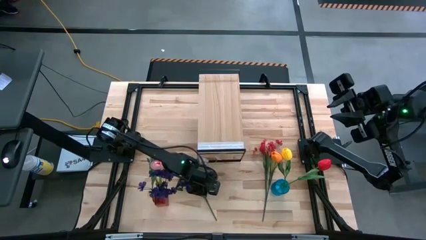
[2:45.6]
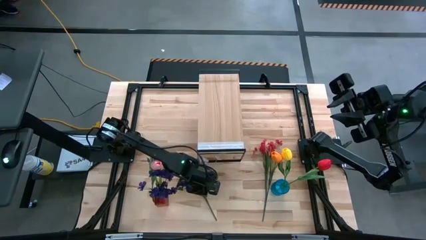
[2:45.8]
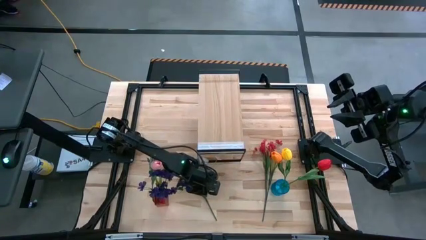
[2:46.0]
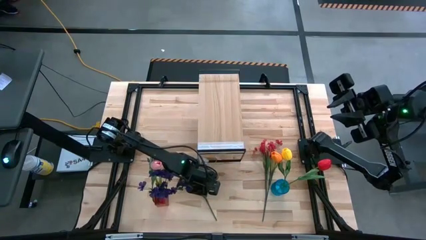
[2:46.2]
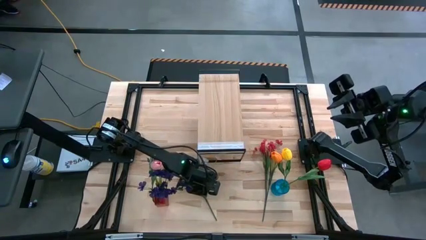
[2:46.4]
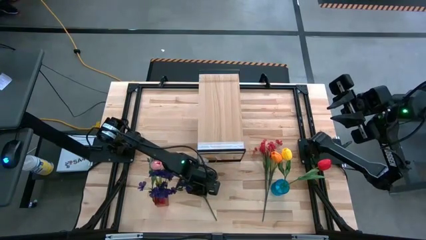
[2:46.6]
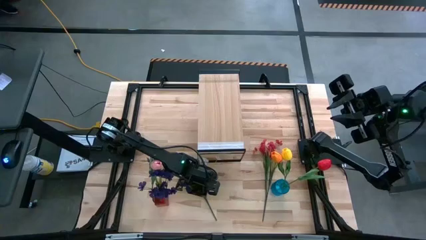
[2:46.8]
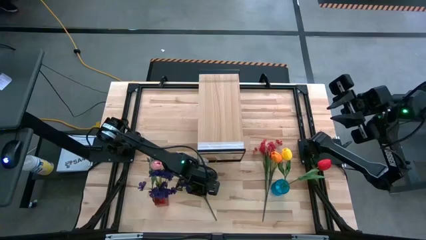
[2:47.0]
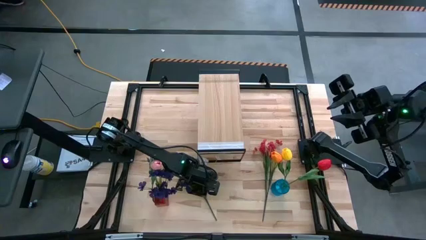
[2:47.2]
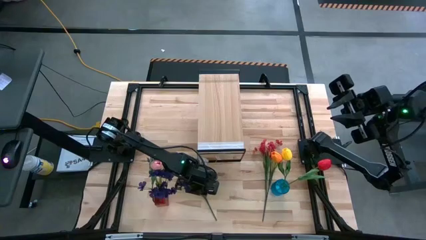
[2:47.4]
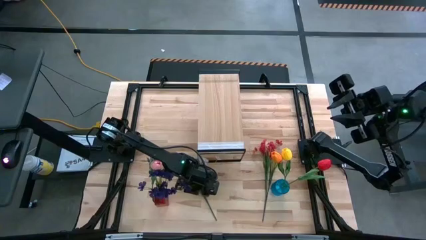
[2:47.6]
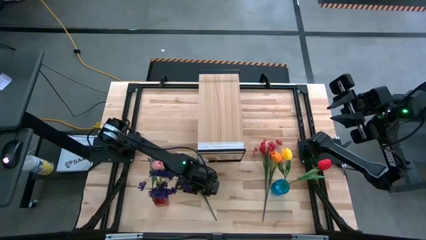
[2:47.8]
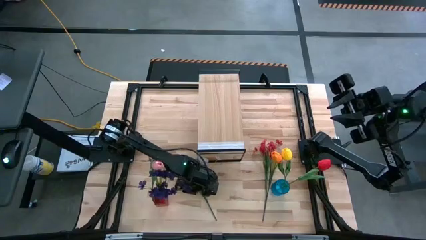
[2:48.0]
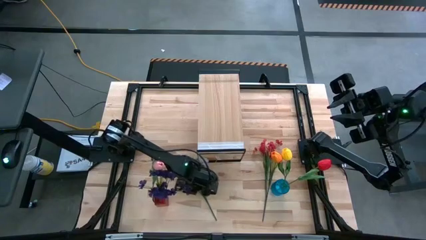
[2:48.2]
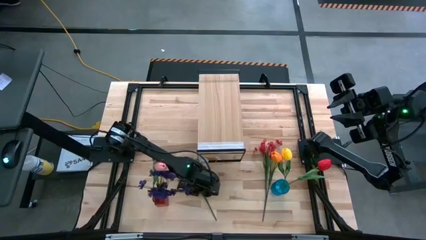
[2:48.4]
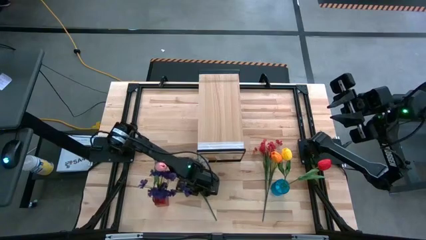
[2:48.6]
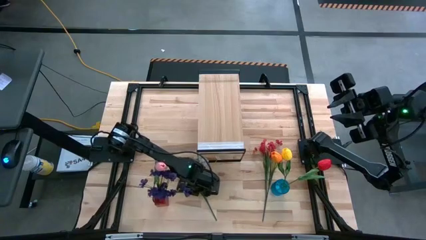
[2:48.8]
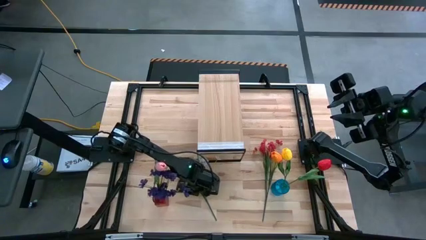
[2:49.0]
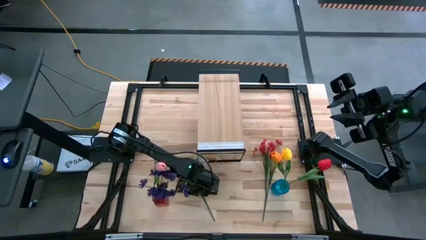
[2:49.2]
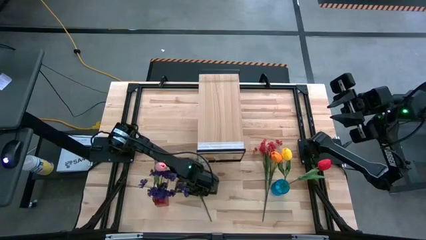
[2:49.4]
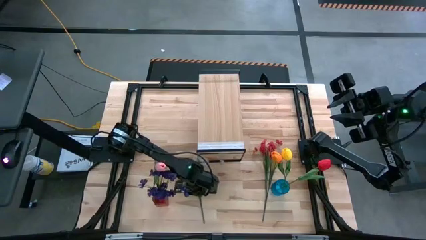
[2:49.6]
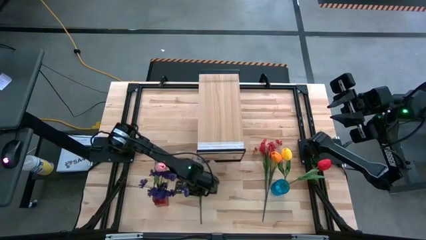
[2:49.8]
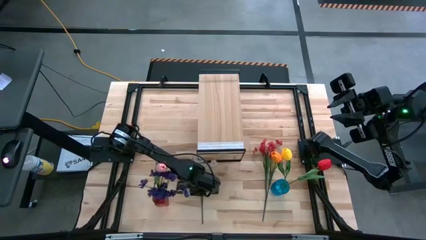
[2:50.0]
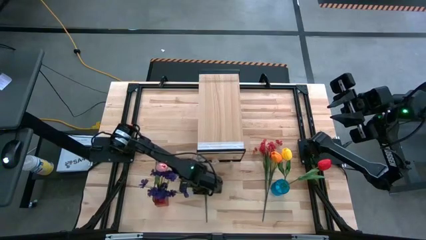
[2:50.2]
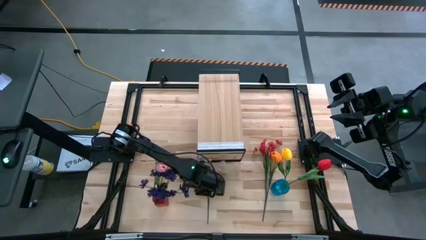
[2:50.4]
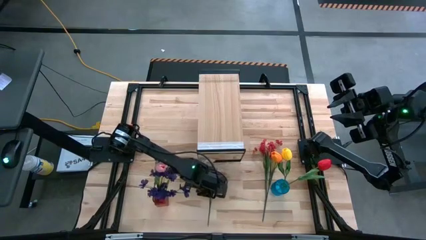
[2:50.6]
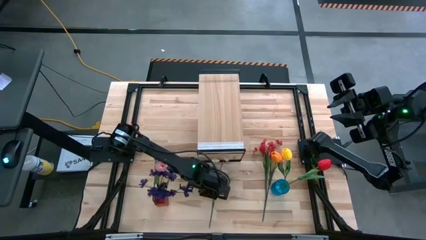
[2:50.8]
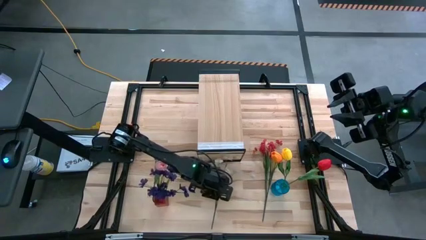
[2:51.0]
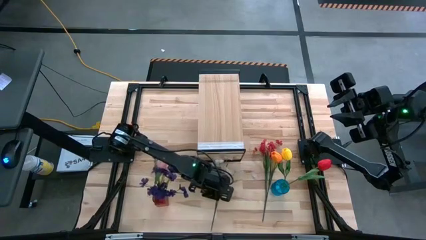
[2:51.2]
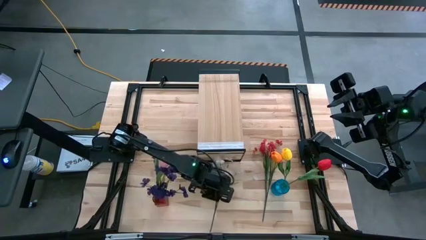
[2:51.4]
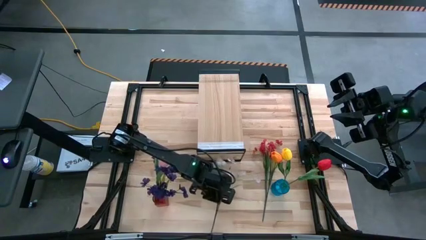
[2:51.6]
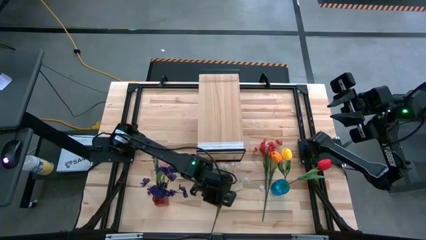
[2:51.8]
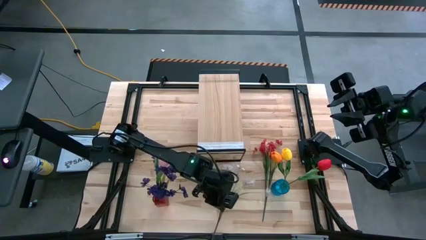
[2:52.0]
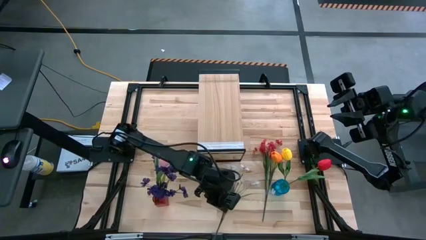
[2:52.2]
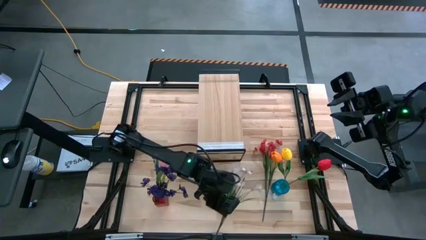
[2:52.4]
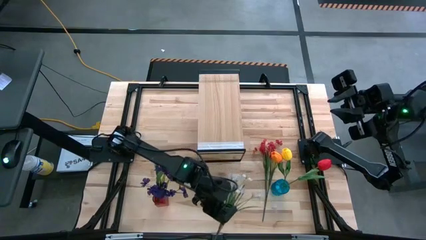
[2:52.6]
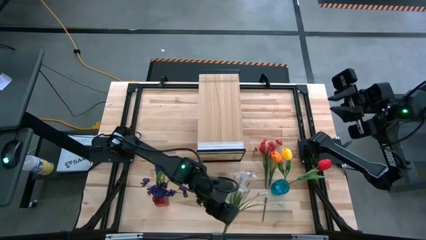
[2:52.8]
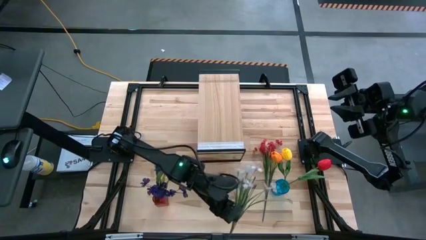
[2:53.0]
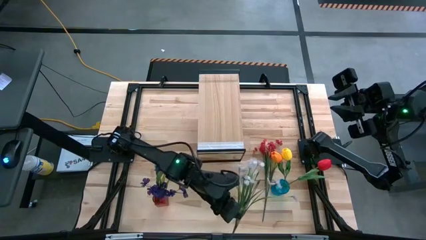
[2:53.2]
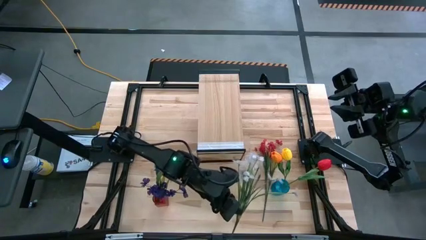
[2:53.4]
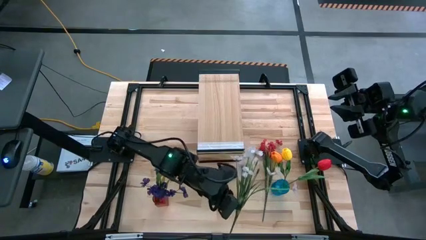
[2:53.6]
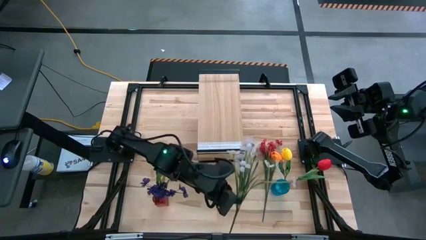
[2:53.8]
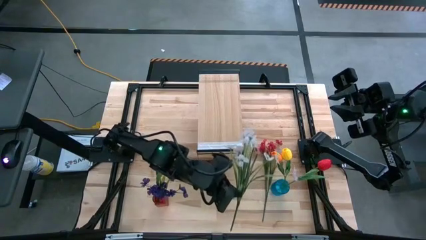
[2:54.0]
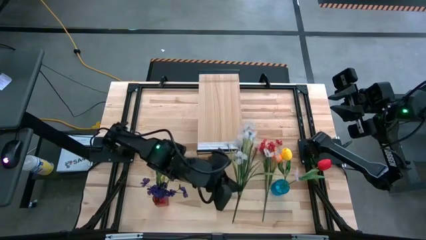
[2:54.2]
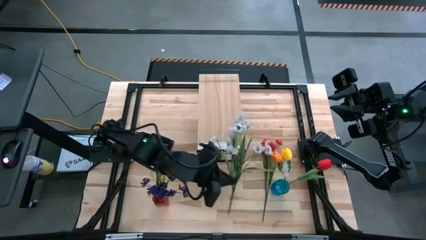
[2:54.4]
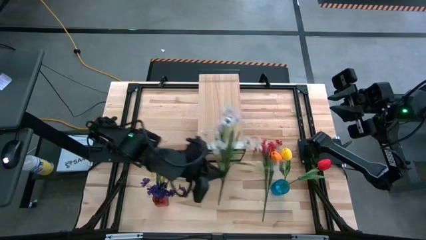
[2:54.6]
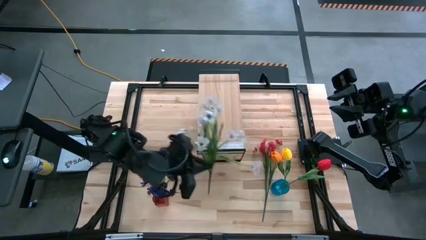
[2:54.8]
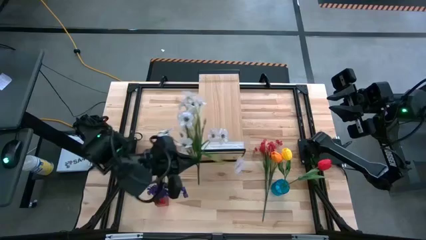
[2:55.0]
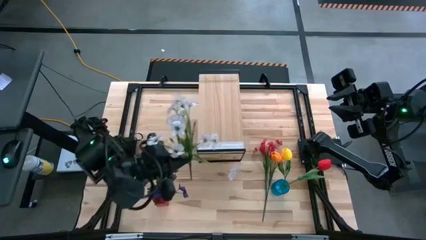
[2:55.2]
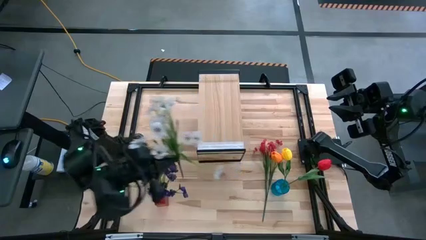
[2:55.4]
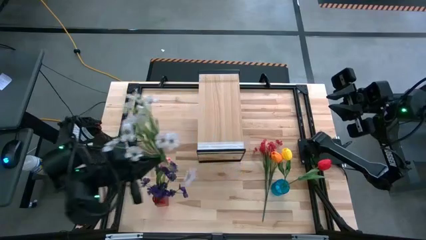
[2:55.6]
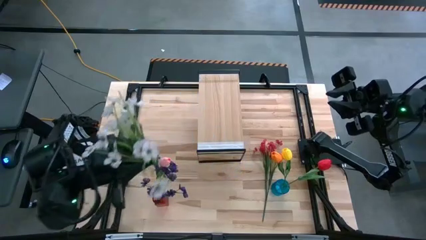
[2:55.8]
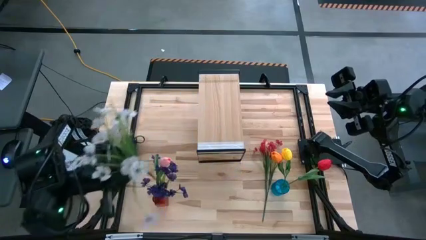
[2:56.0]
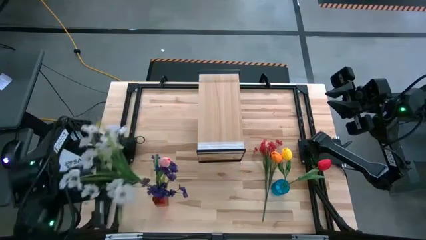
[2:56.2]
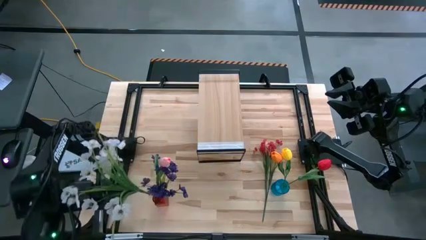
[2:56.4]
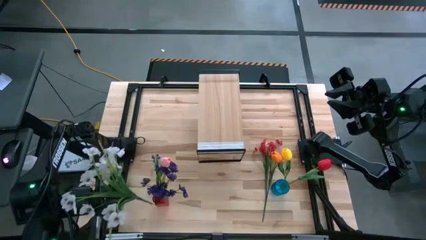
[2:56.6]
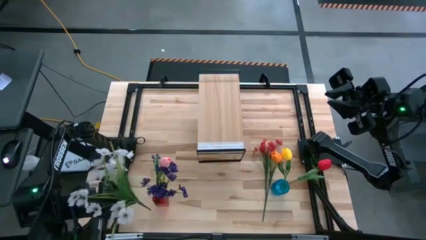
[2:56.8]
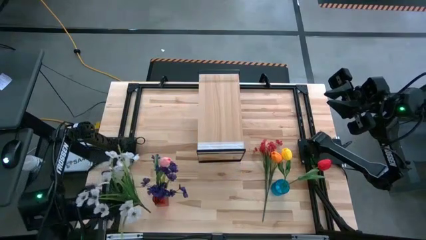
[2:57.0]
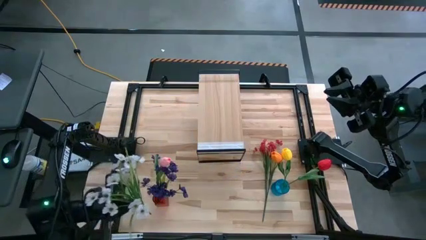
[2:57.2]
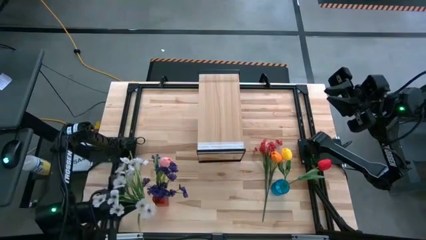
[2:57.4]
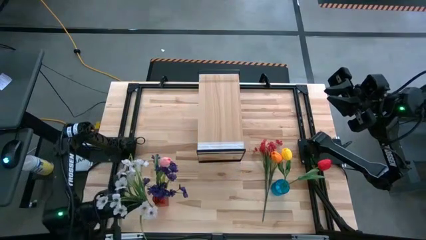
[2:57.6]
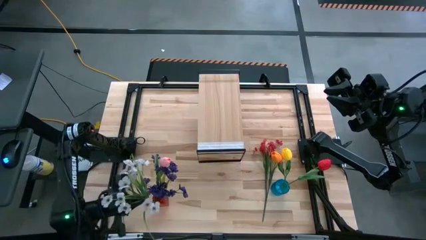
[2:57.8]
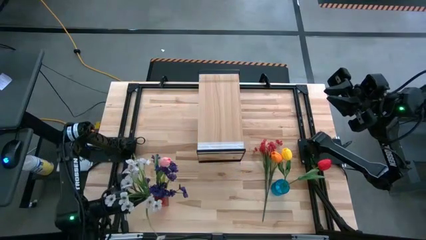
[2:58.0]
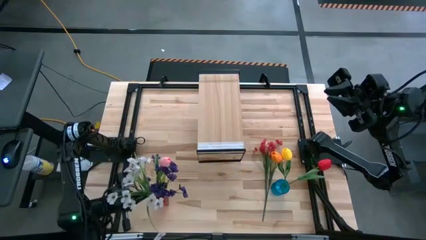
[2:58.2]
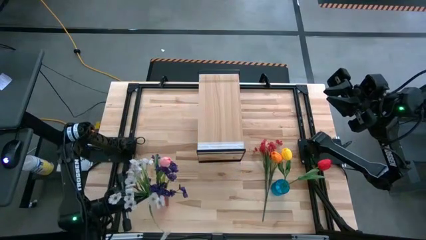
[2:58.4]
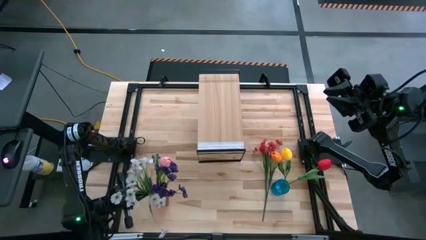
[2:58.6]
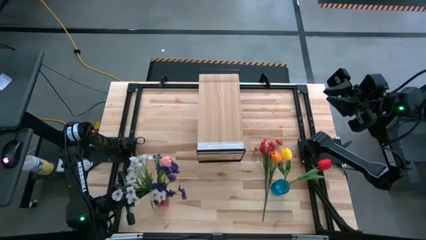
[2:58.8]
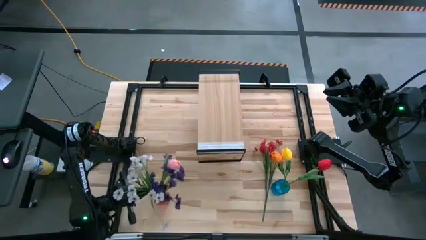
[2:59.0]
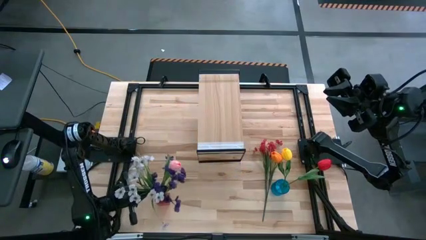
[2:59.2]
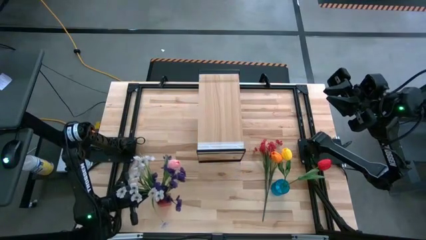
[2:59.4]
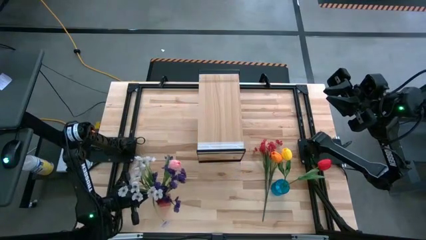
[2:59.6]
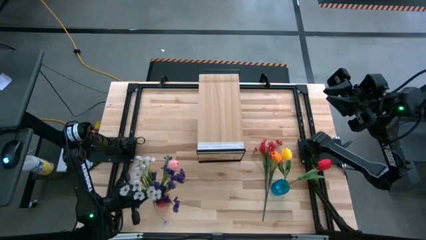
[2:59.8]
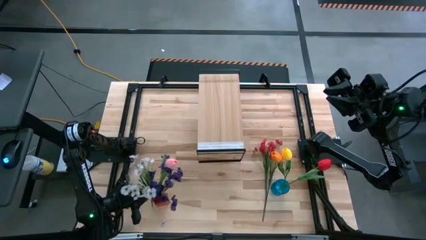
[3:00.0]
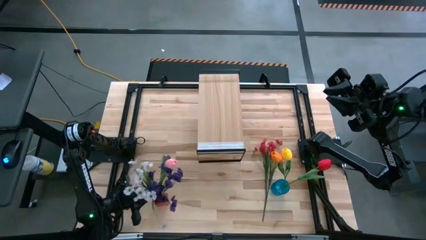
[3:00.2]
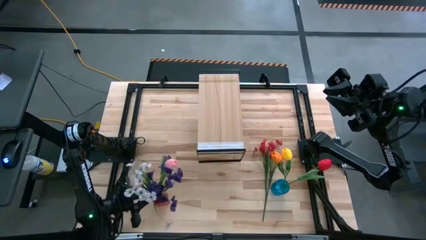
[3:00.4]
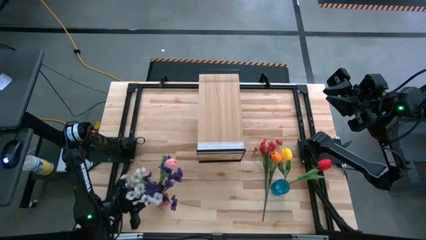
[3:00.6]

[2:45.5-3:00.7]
Task: Pick and place flowers into a vace then onto a shelf
Put the white flowers into the red vase

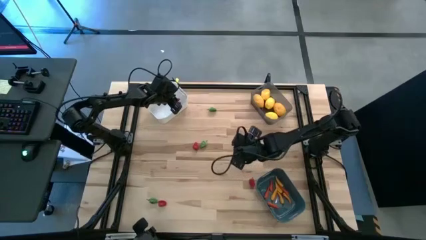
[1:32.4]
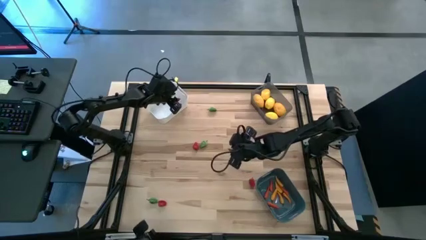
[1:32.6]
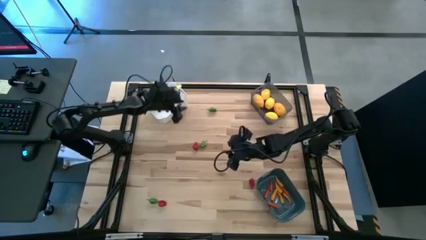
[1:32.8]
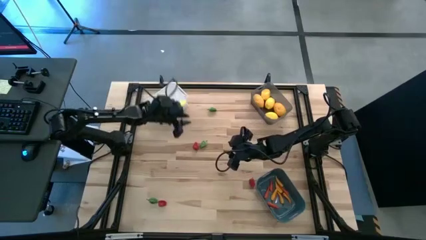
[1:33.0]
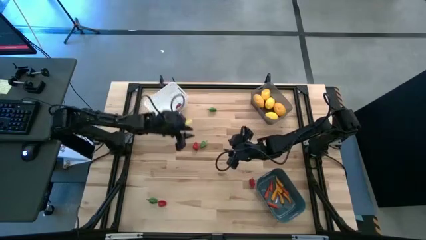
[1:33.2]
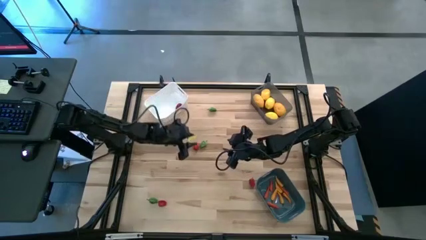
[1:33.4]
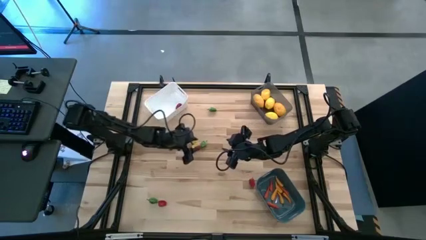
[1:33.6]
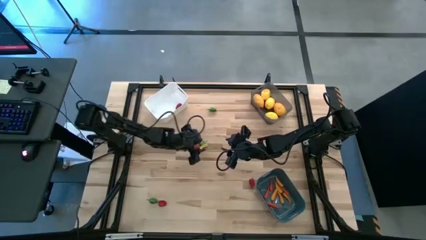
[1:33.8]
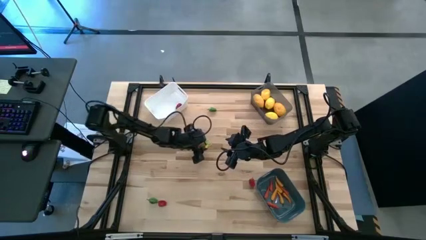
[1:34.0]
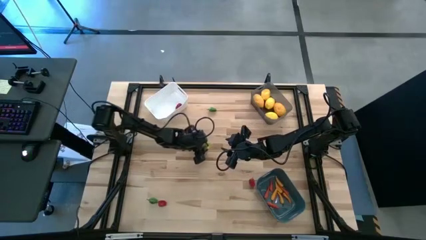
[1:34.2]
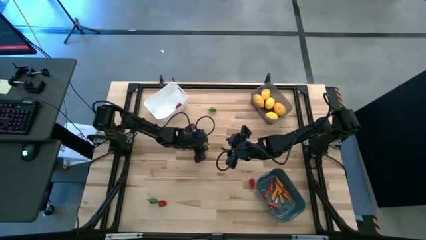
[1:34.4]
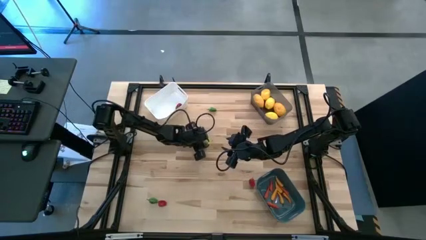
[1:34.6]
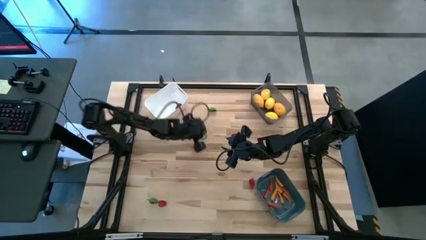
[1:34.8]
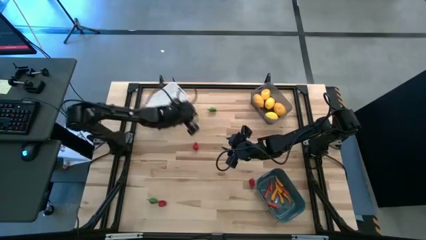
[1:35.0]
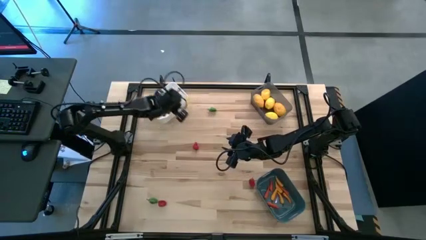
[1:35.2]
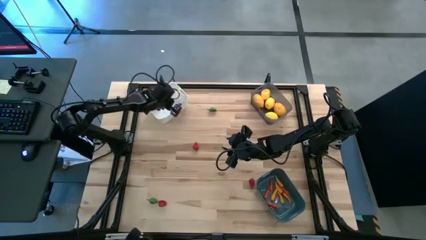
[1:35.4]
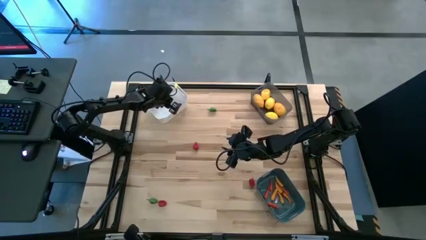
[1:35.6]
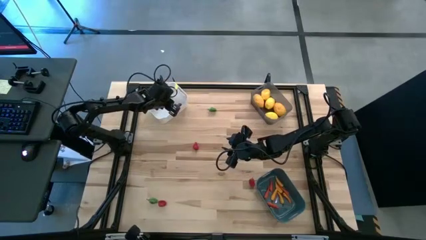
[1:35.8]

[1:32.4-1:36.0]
Task: Sort produce into baskets
Put the green chili pepper into the white bin
